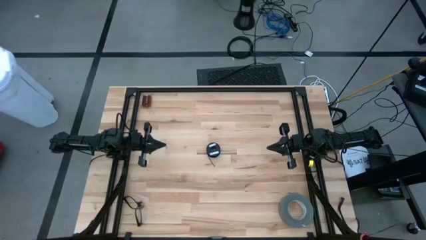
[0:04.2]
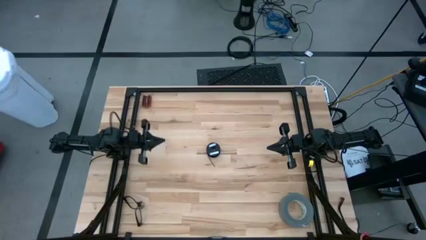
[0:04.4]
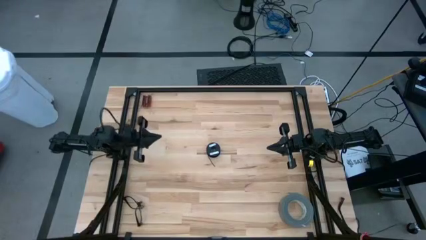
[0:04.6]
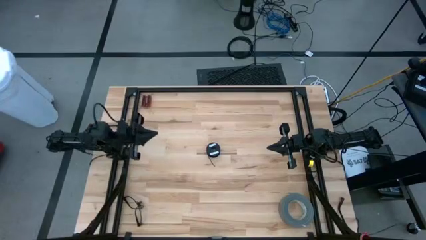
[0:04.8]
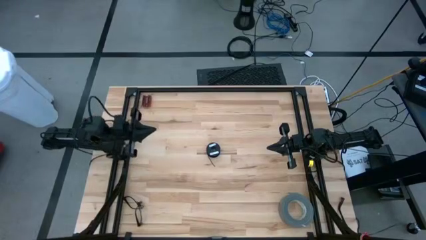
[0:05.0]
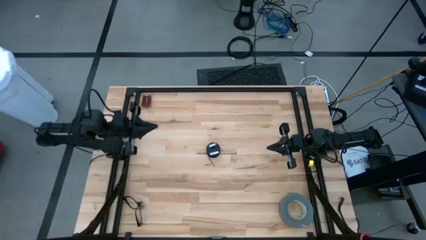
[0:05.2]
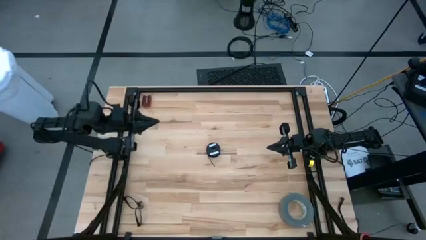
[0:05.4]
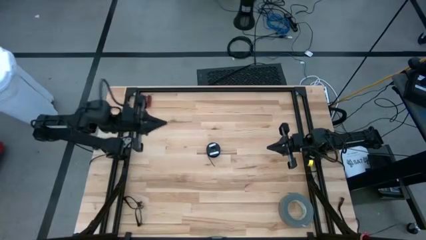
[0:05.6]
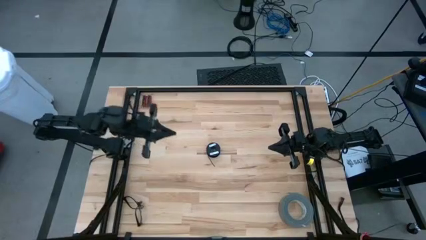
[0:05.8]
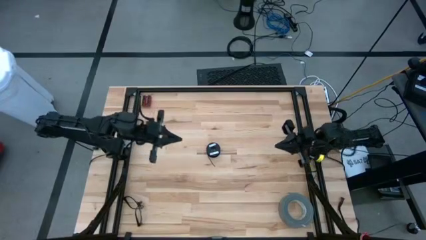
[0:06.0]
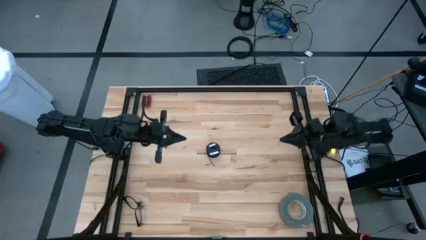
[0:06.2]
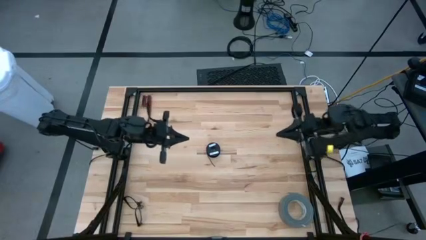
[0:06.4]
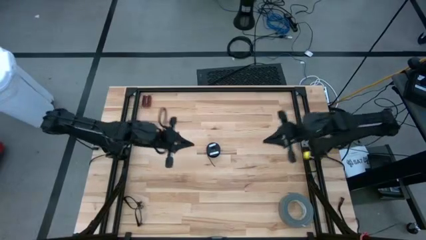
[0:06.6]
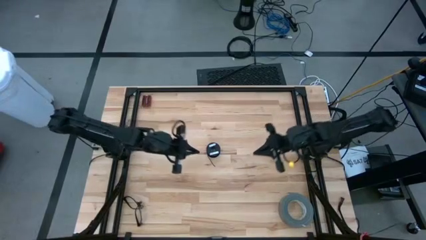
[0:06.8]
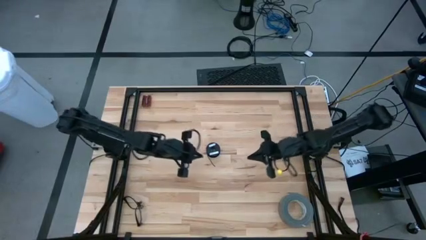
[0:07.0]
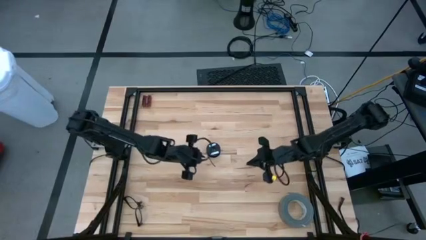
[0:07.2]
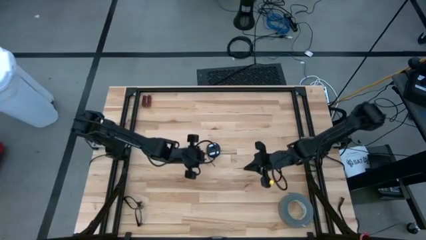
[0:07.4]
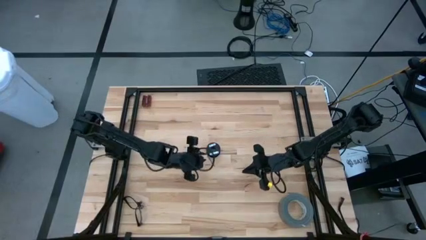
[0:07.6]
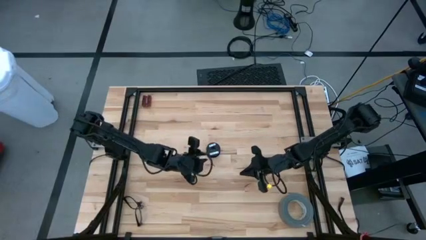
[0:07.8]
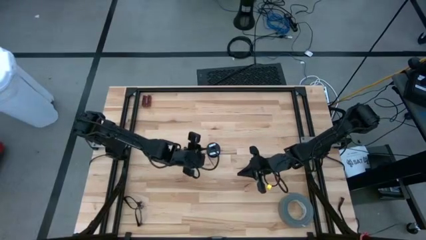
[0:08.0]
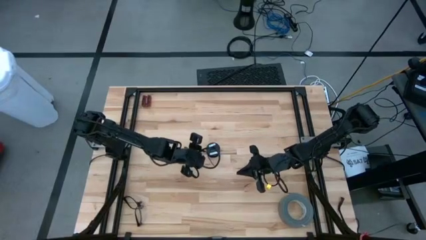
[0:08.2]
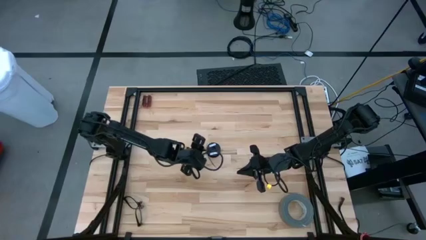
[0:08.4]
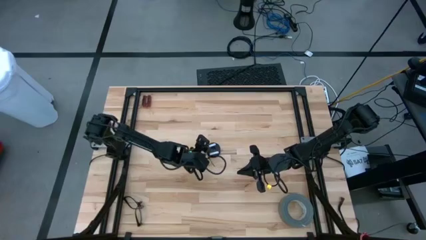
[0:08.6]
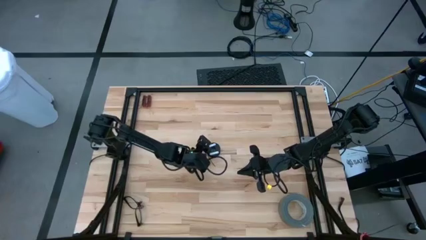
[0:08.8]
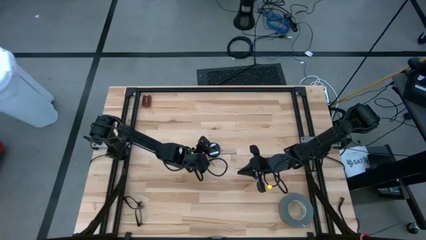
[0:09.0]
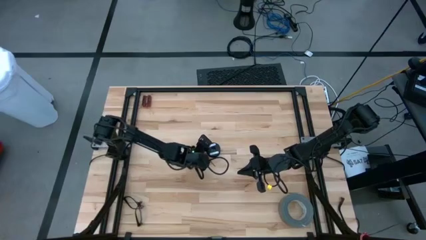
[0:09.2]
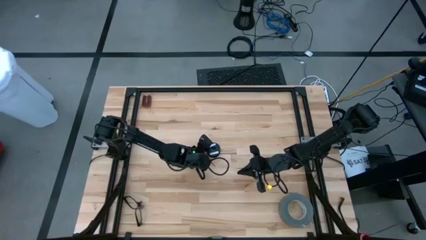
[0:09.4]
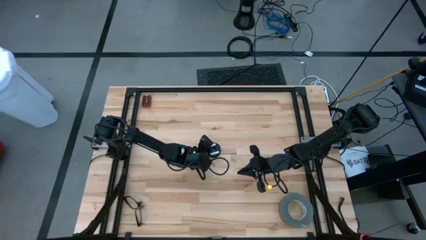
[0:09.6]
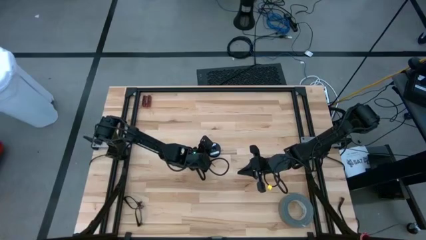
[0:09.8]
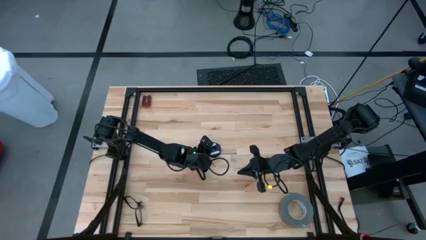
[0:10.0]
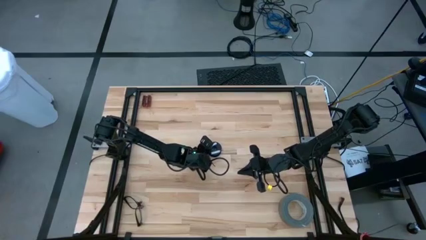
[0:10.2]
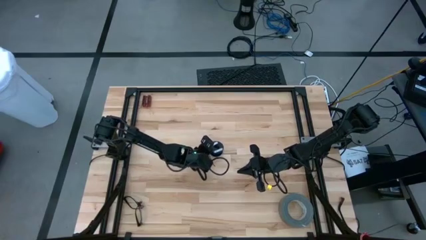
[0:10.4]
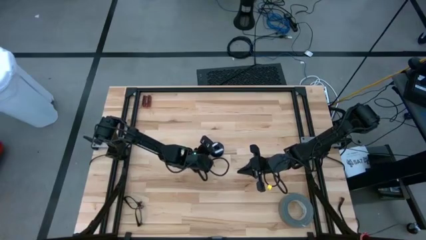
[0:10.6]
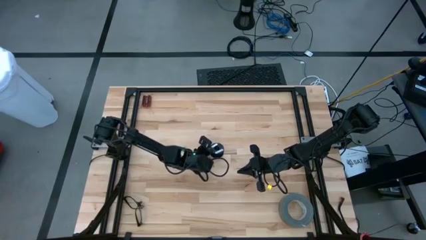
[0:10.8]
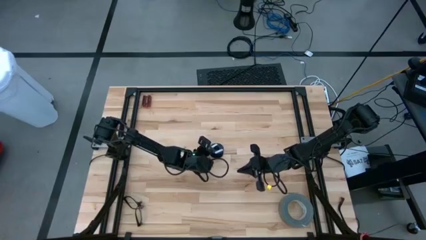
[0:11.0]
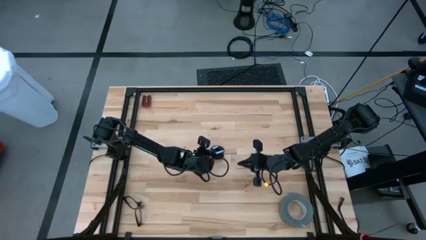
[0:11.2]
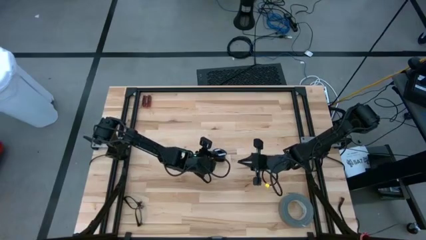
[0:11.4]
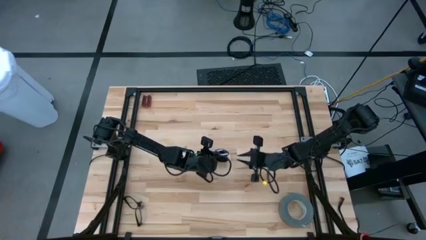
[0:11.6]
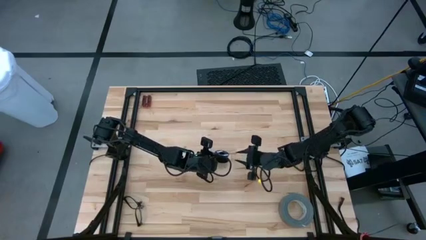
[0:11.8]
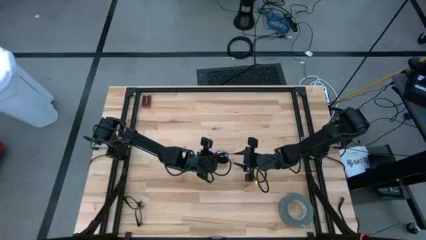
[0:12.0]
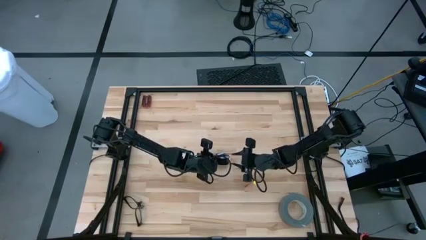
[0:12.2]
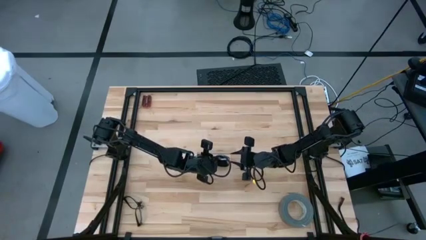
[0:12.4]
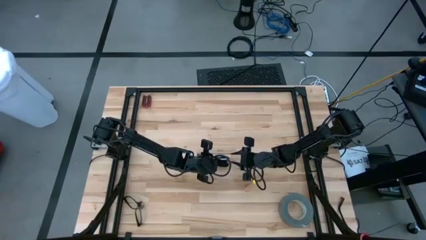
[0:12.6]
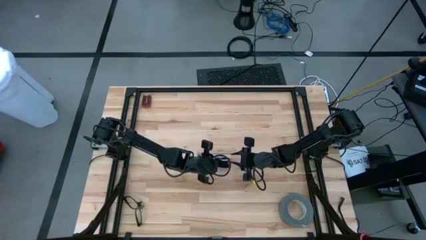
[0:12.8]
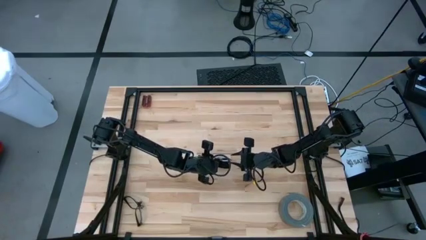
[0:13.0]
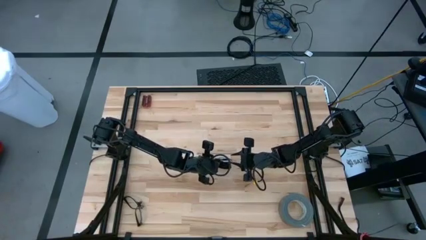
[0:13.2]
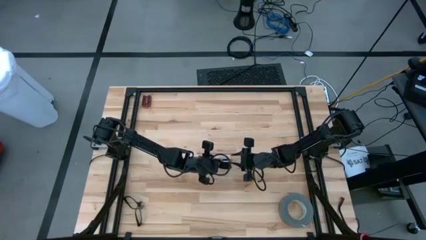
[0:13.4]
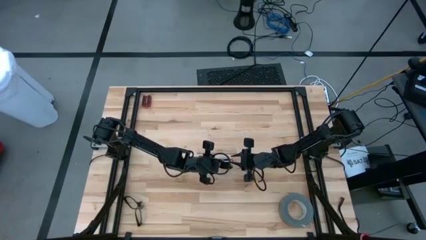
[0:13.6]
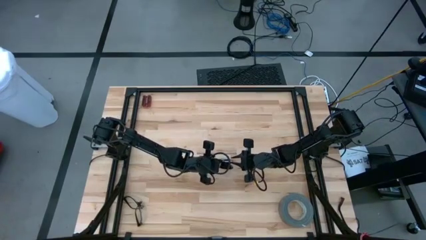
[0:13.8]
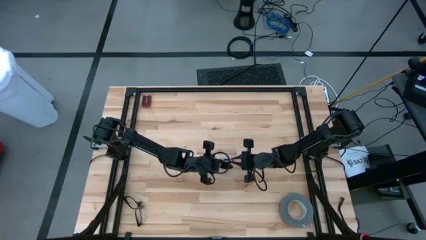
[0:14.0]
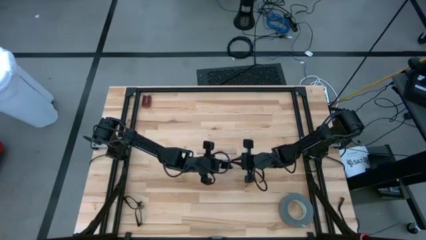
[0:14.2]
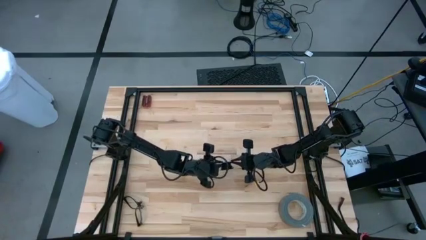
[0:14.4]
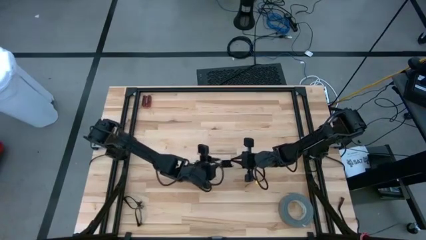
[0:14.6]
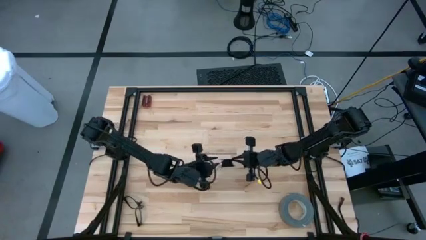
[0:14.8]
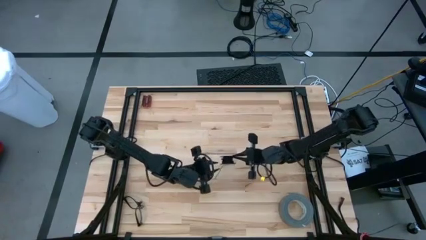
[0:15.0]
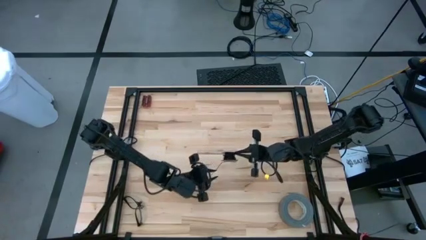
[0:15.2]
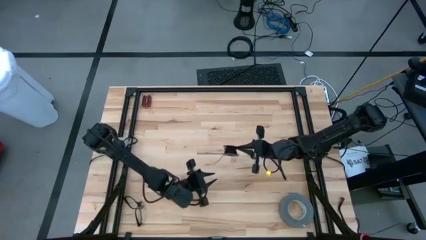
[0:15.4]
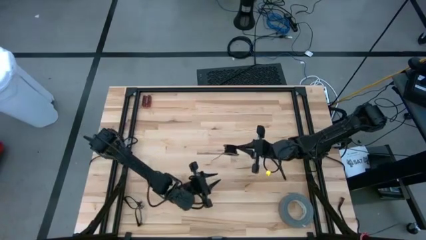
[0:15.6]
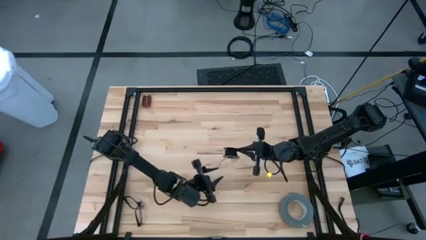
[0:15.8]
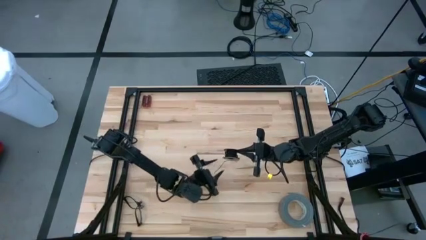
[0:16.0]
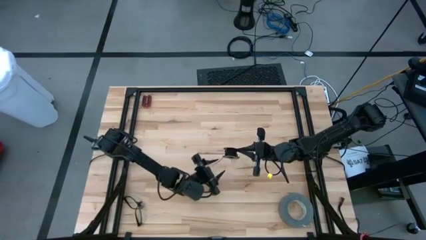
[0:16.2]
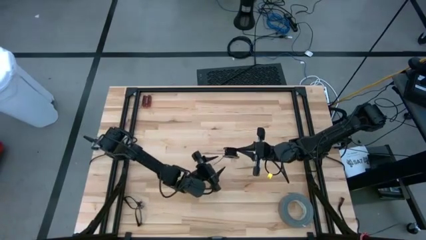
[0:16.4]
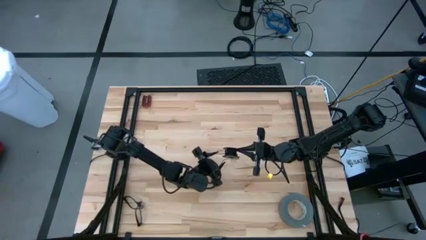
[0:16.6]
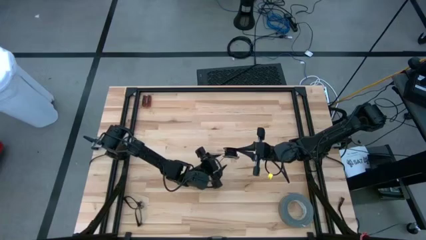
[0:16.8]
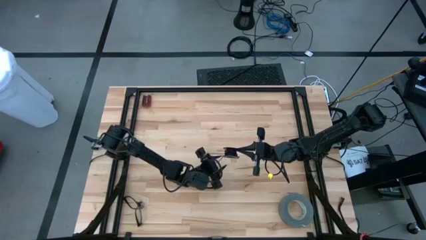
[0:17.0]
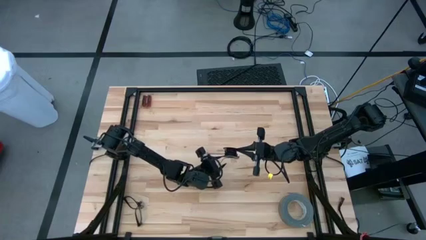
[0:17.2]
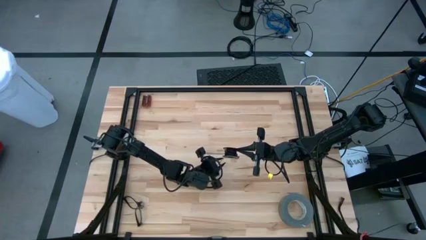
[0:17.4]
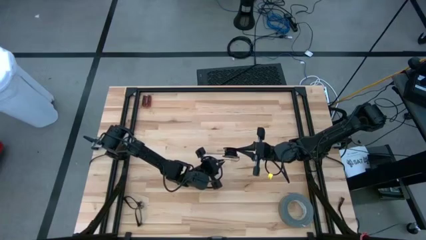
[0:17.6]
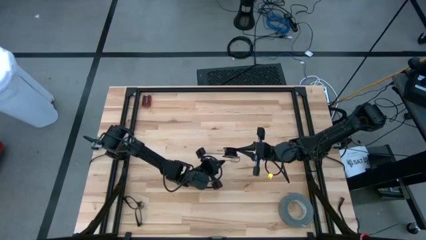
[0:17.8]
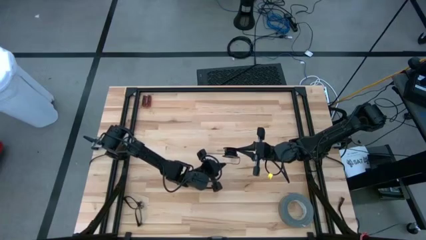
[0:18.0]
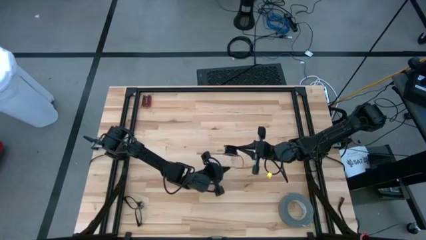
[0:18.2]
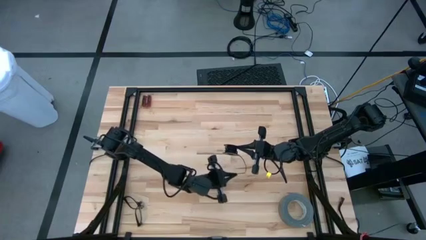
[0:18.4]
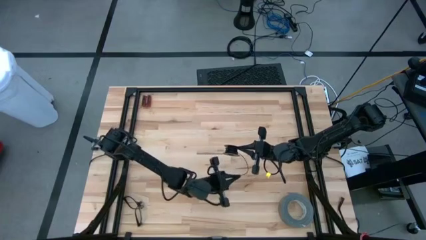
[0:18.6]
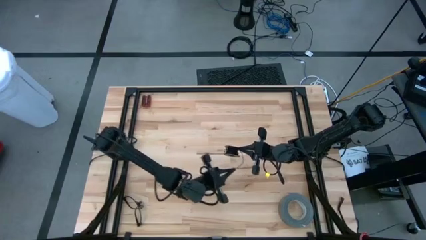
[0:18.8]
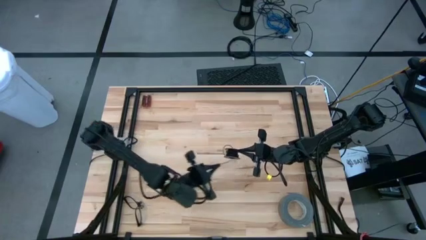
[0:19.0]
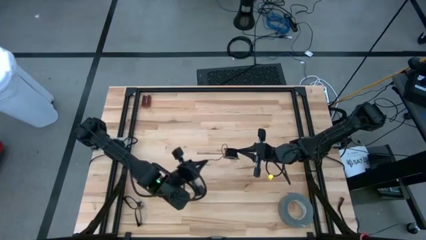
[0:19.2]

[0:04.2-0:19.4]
Task: Coil cords
Uncoil the black wire from the spool
